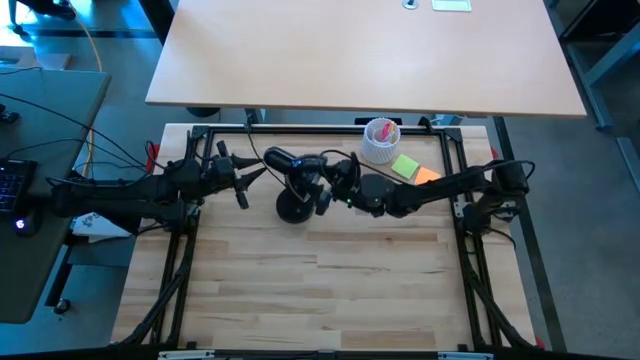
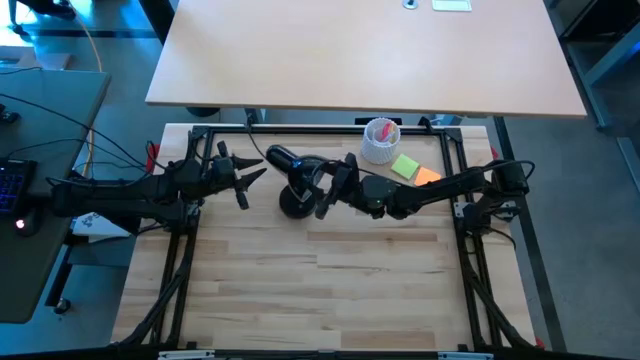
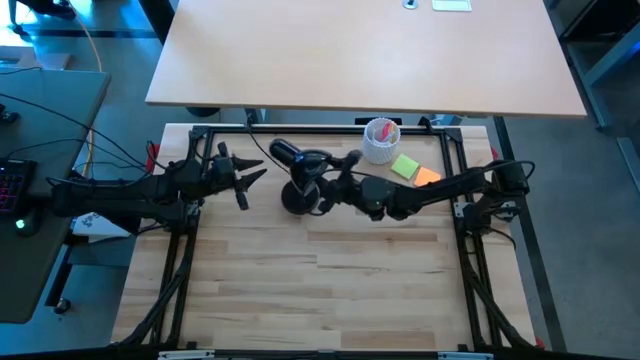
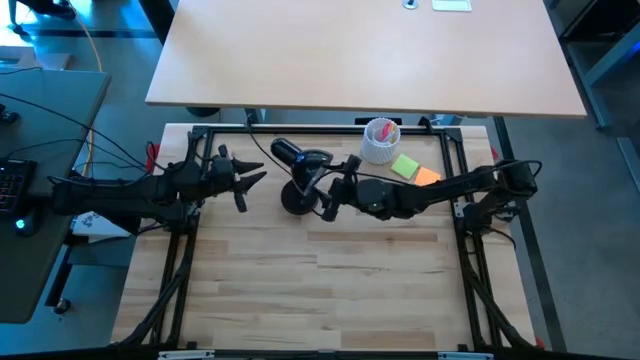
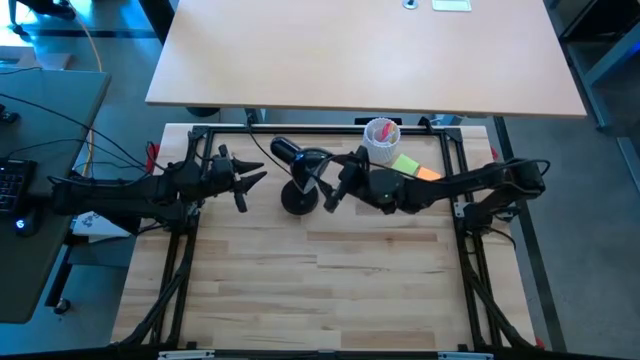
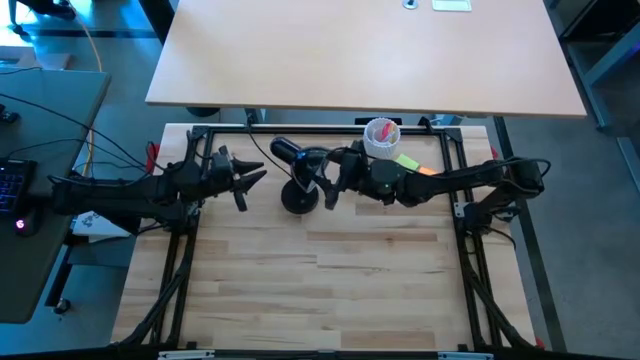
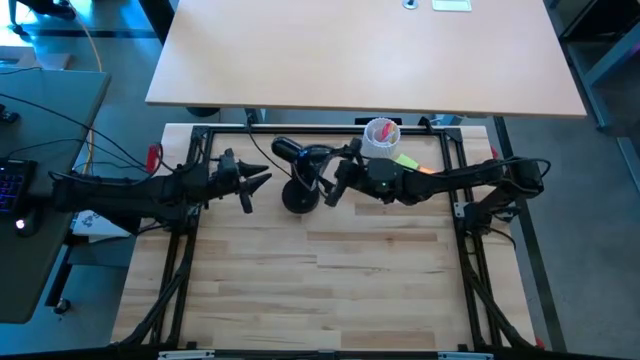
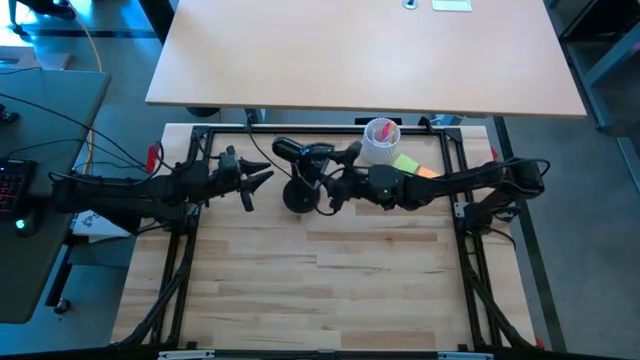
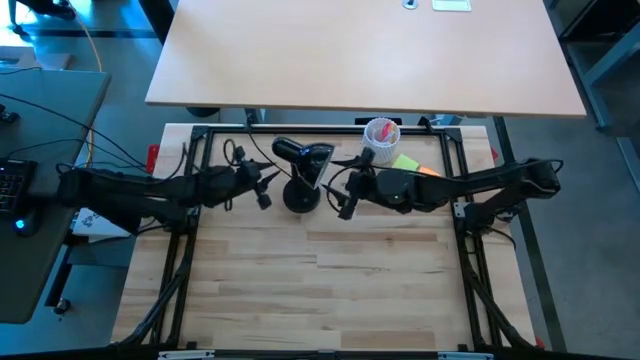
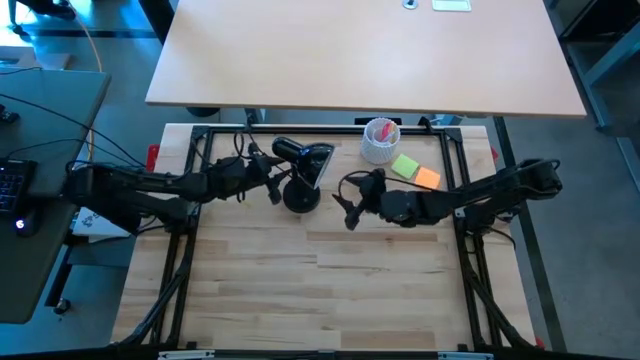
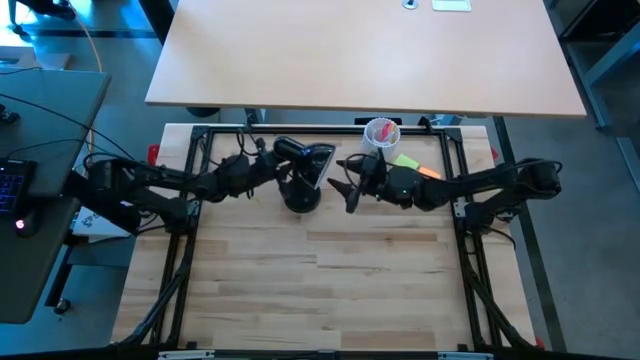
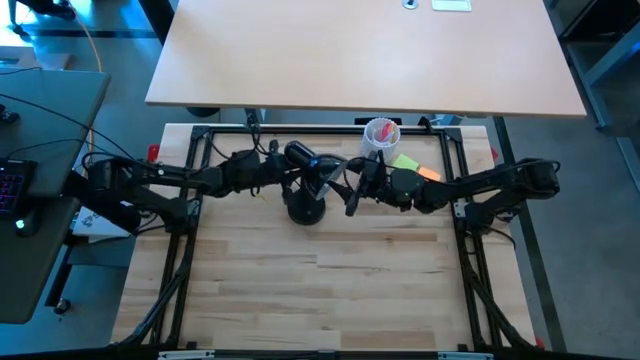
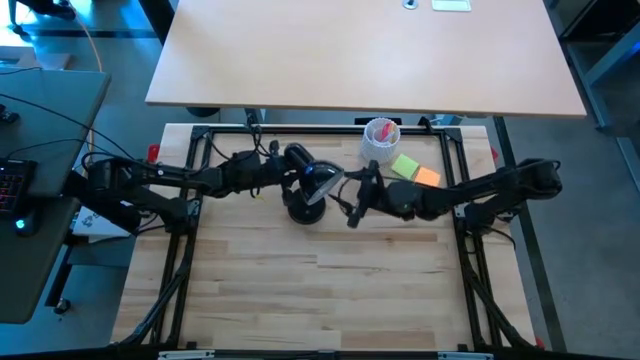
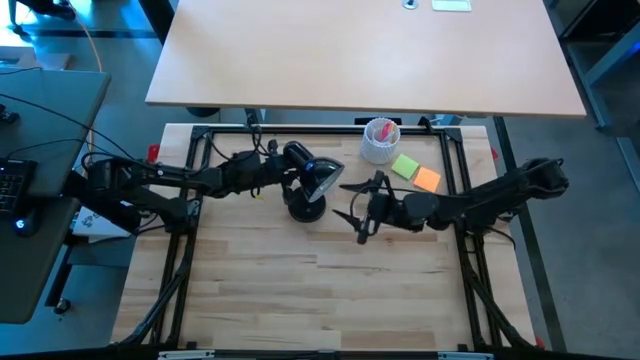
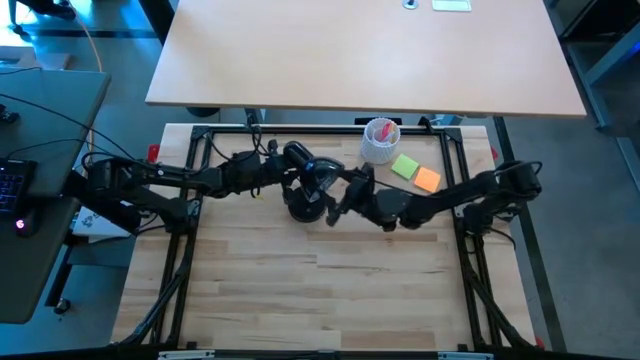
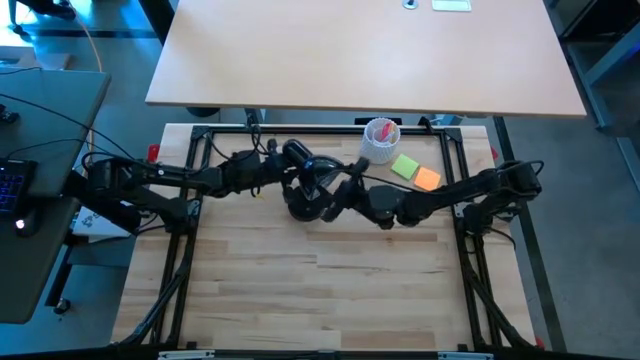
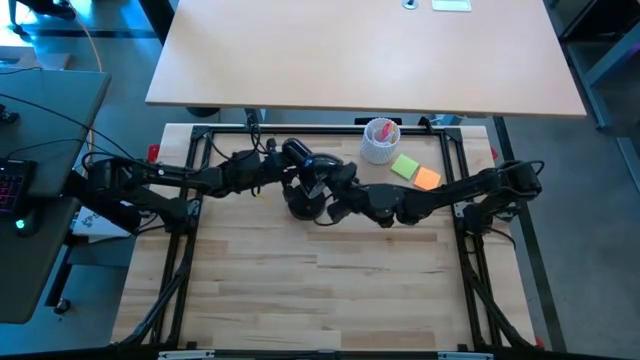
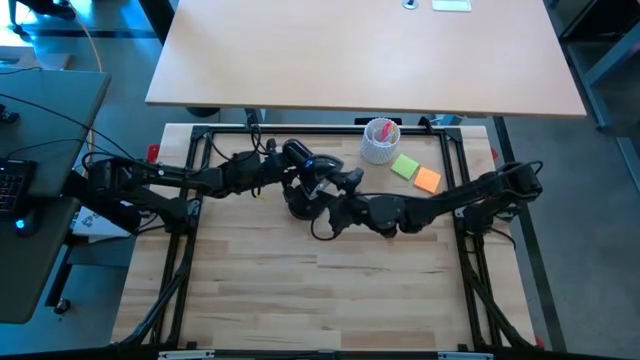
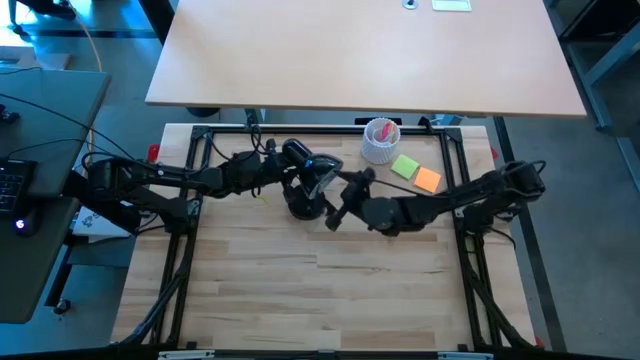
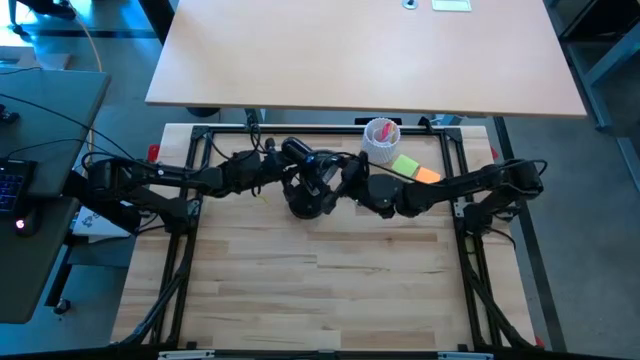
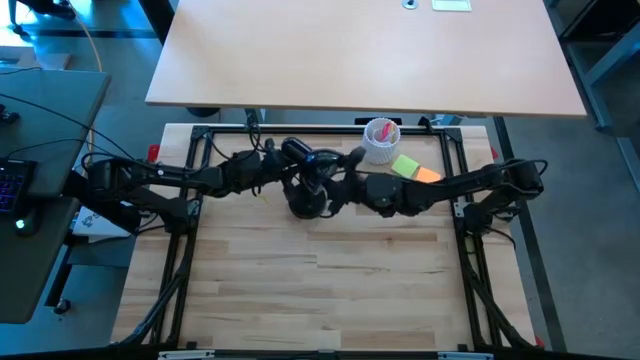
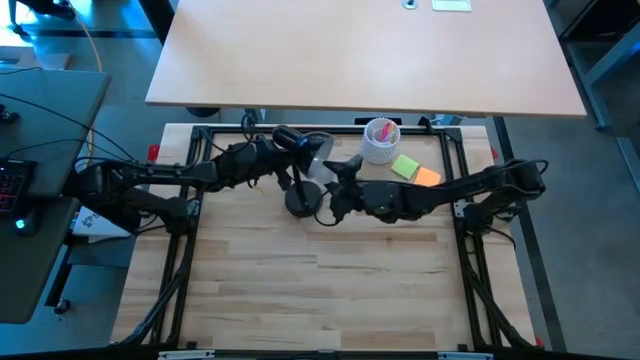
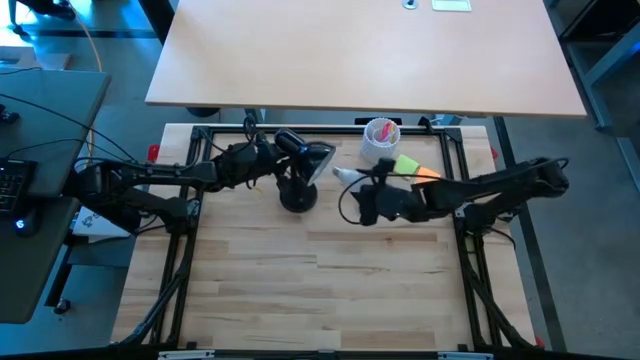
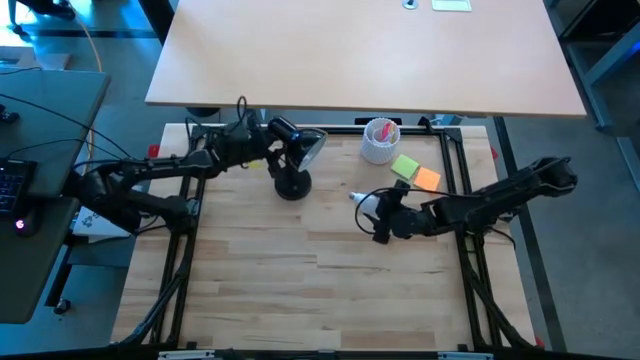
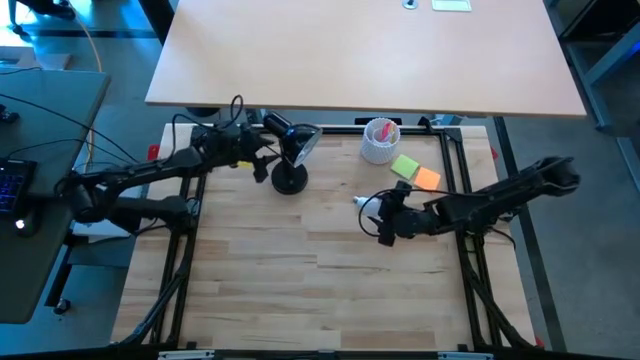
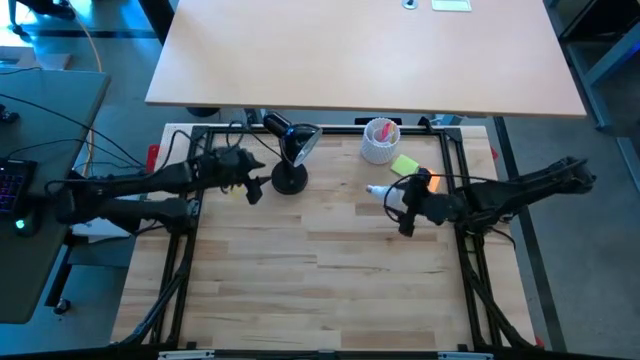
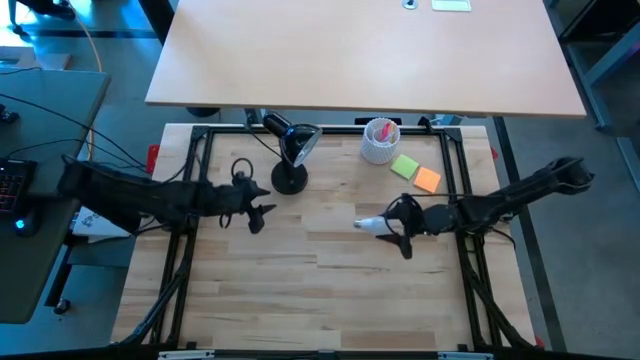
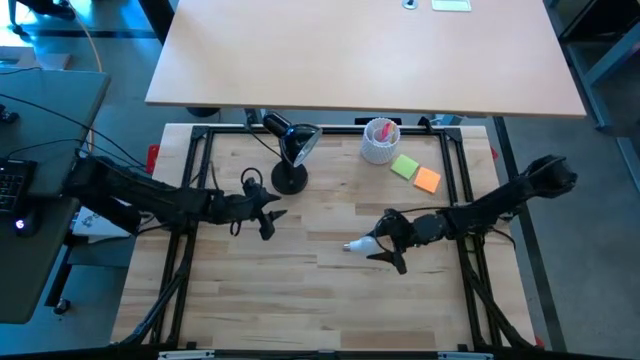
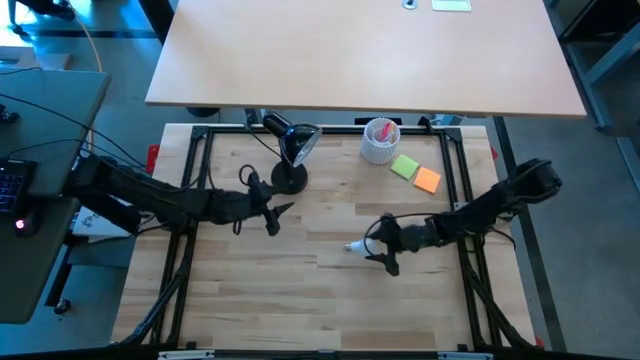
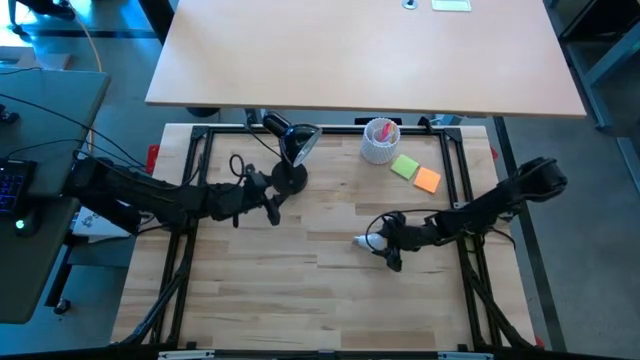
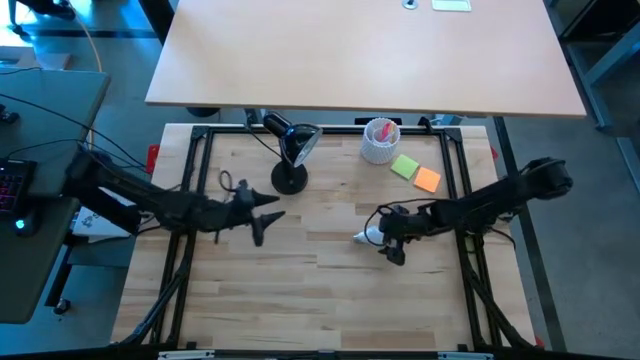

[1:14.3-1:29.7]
Task: Screw lightbulb
Remove the lightbulb from the lamp

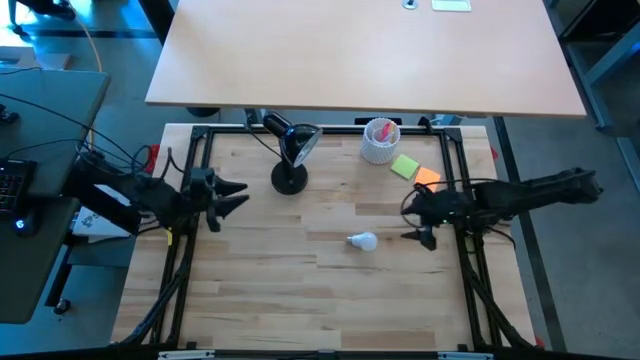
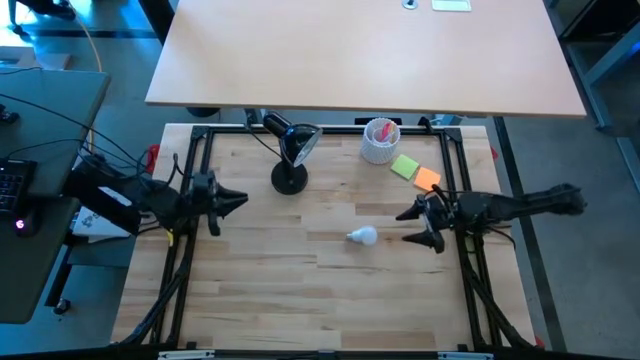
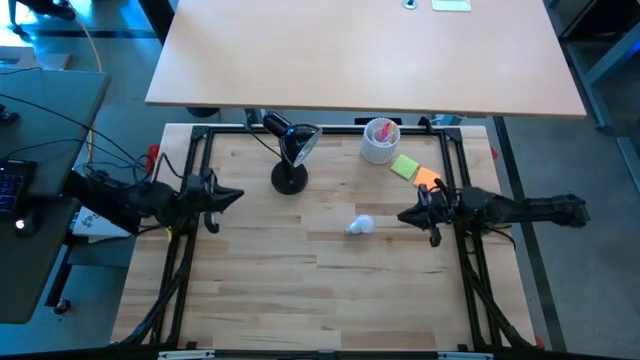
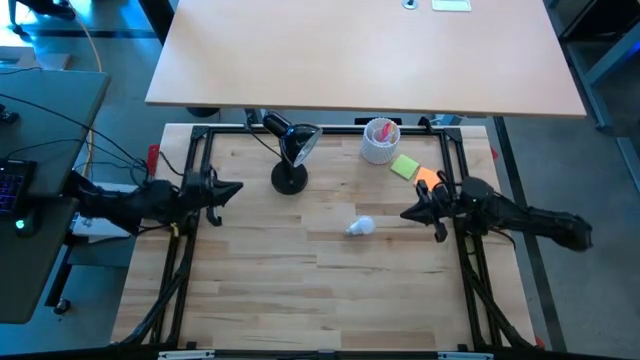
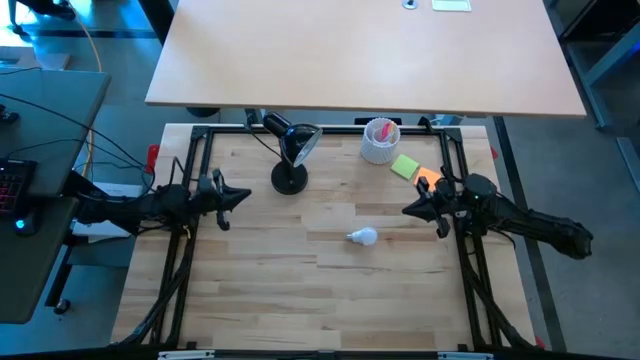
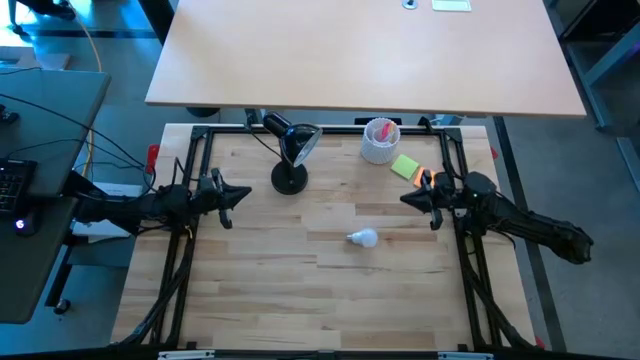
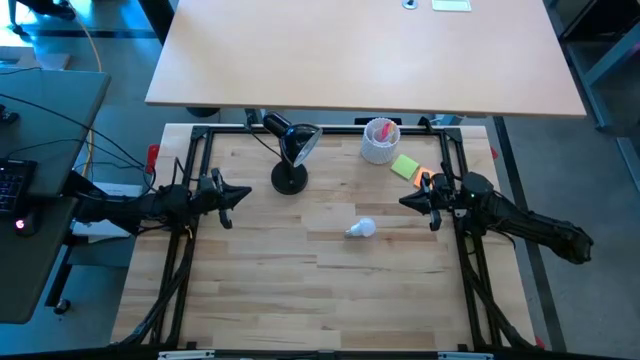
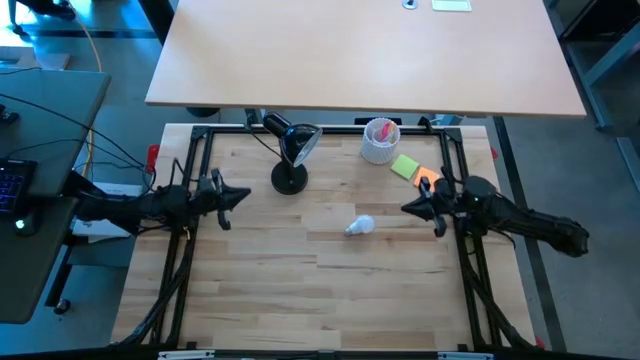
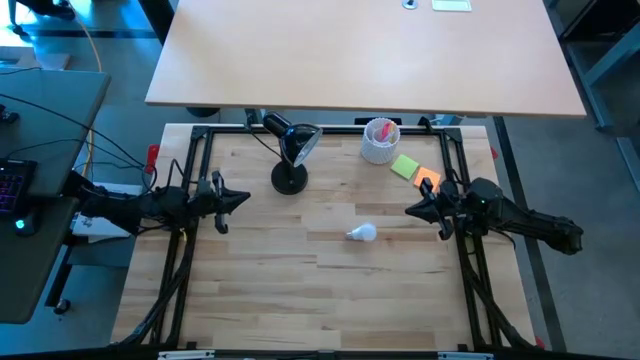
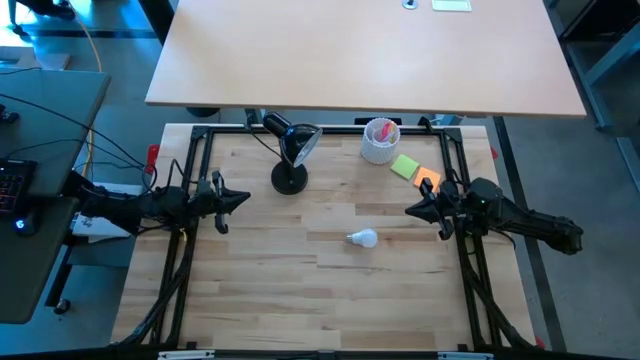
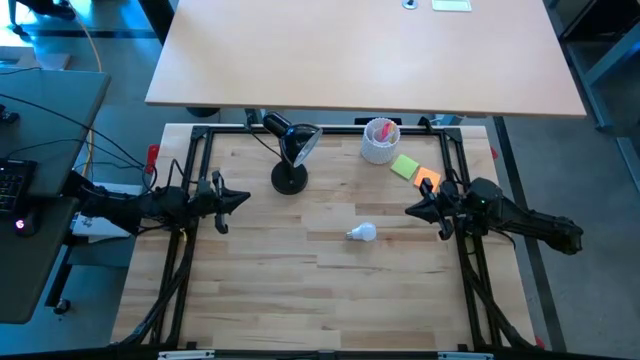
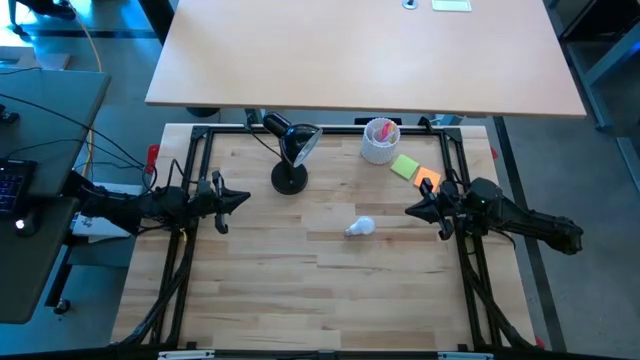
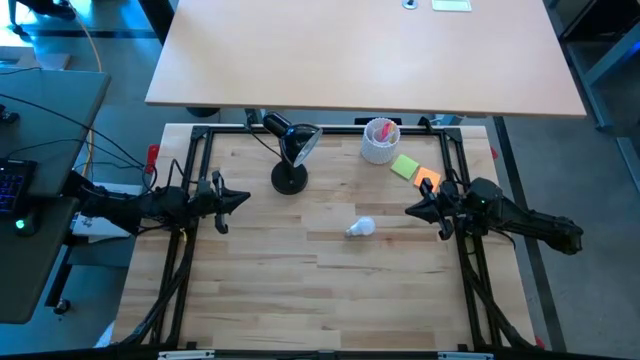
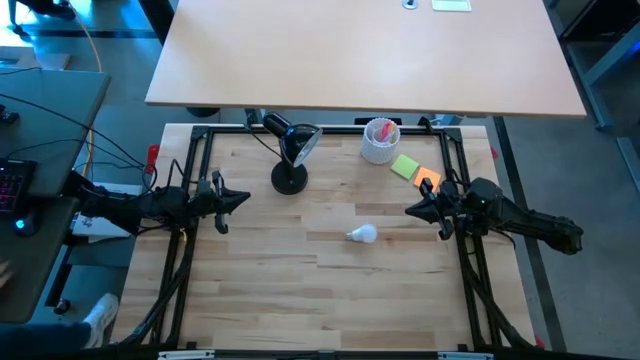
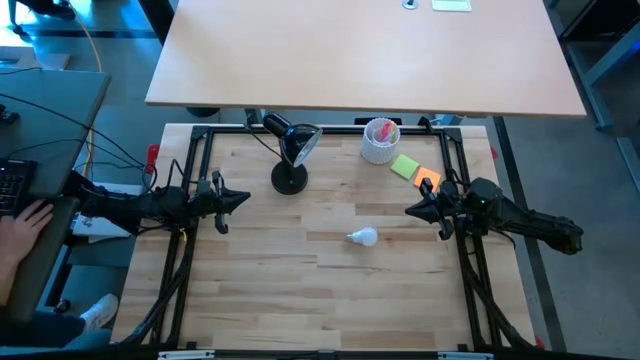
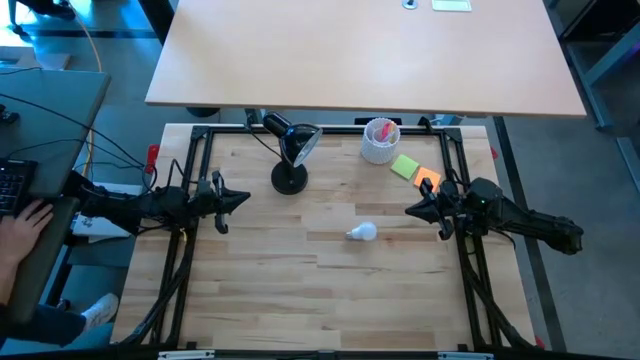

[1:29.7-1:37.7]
Return to Home Position
